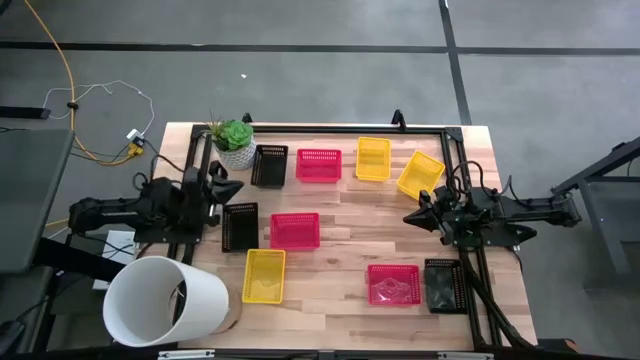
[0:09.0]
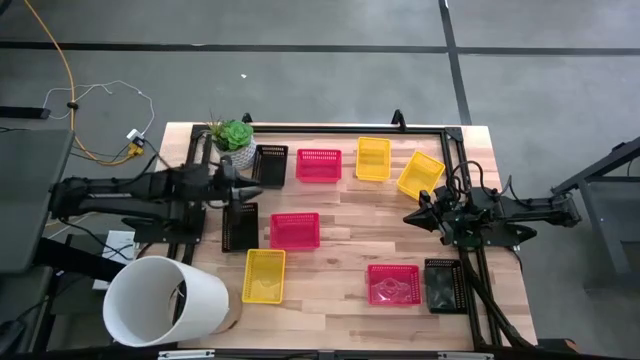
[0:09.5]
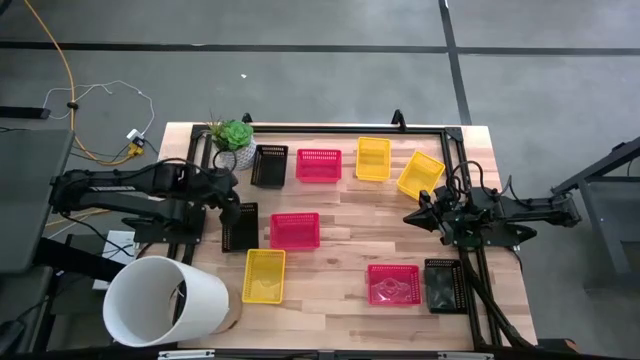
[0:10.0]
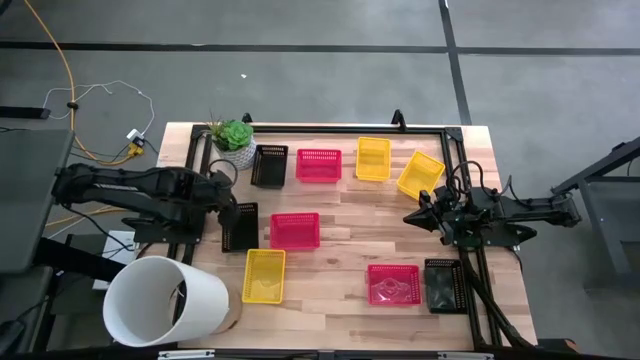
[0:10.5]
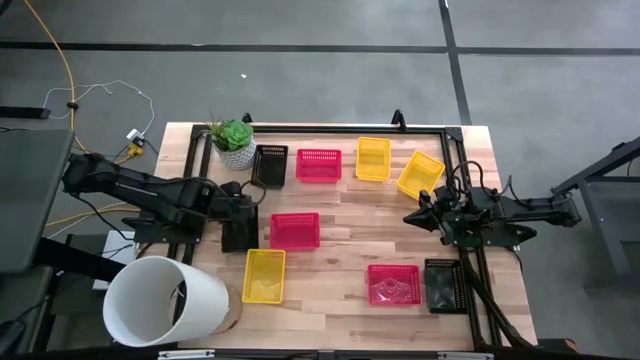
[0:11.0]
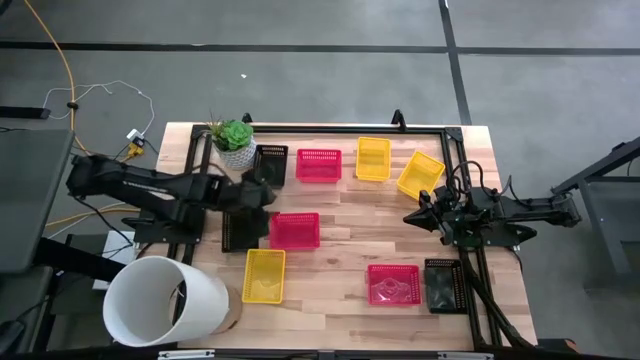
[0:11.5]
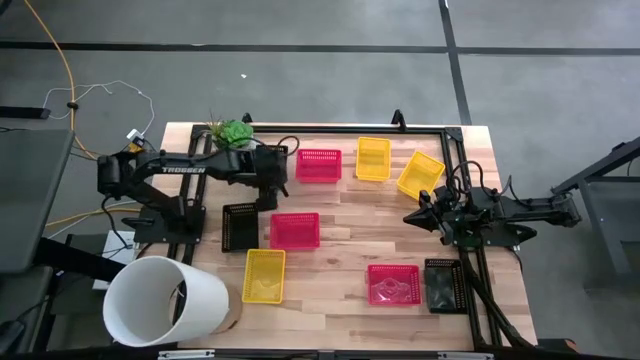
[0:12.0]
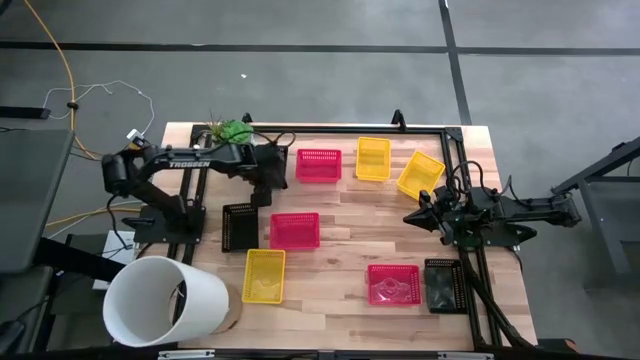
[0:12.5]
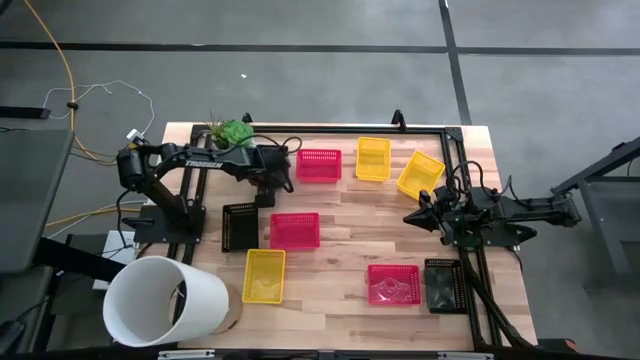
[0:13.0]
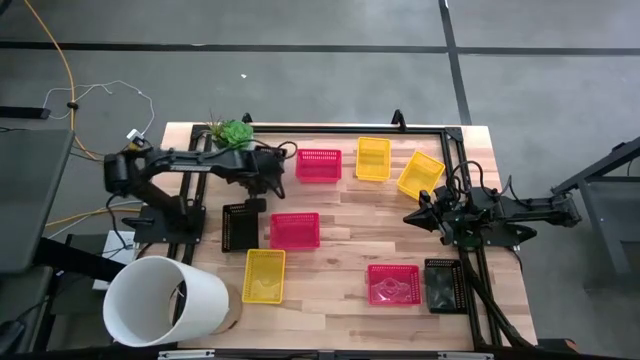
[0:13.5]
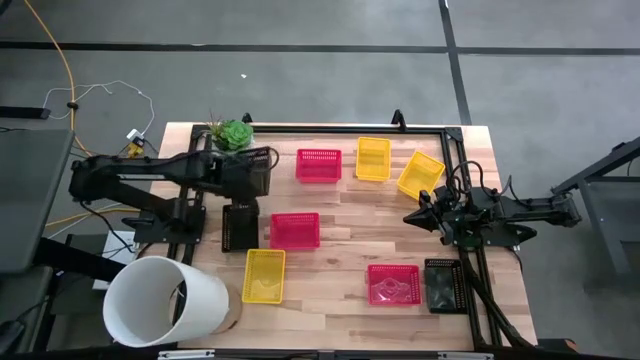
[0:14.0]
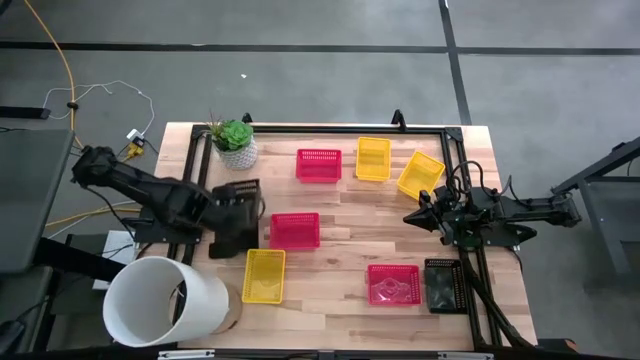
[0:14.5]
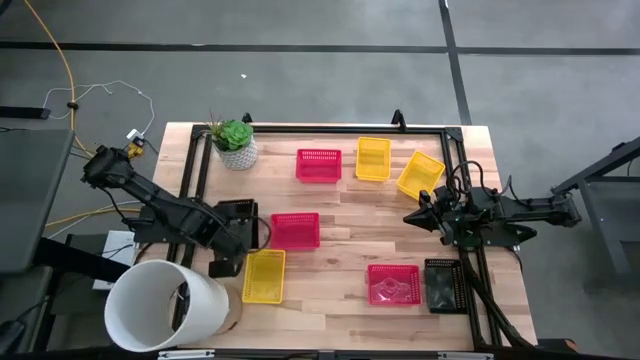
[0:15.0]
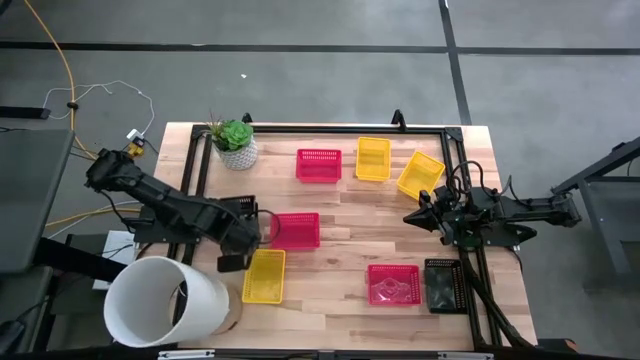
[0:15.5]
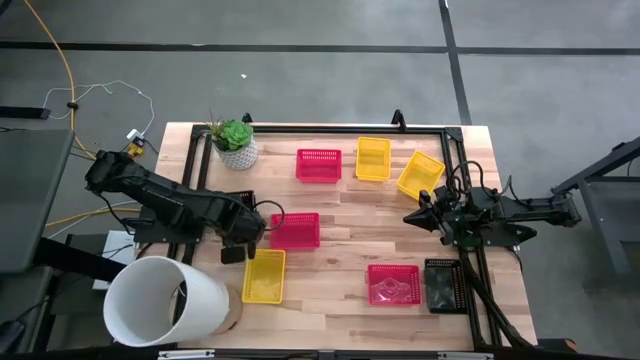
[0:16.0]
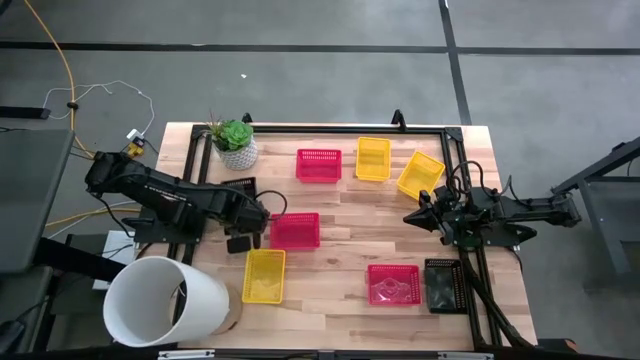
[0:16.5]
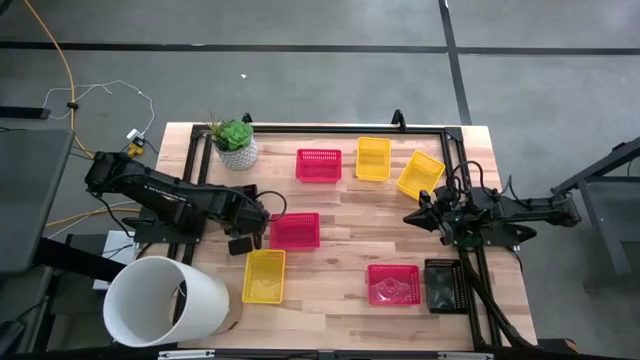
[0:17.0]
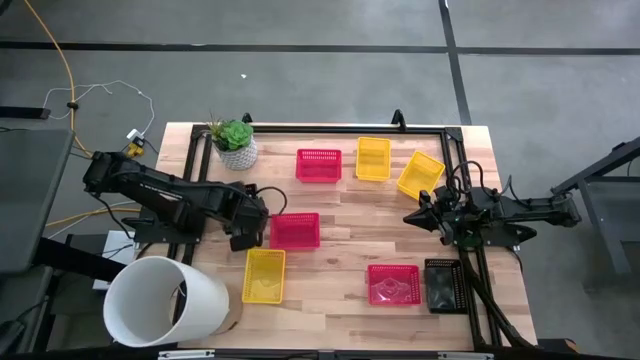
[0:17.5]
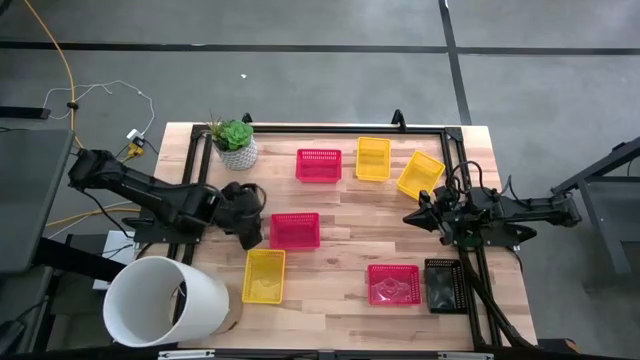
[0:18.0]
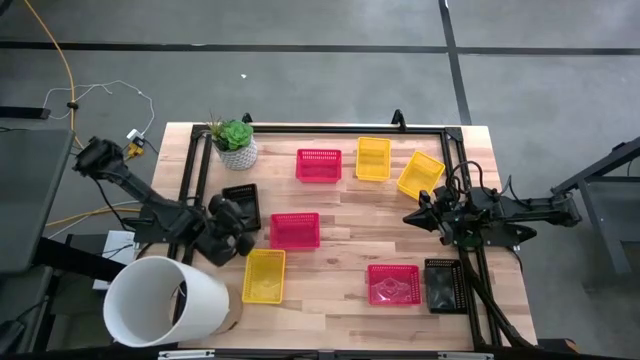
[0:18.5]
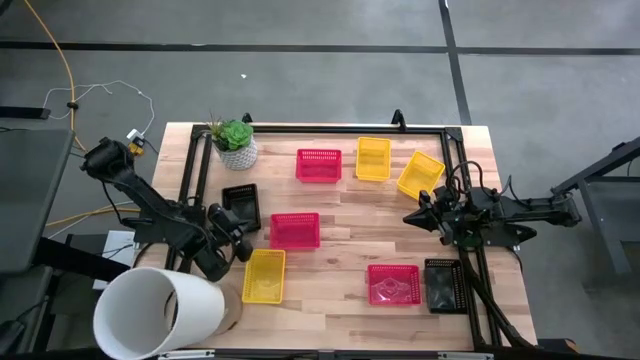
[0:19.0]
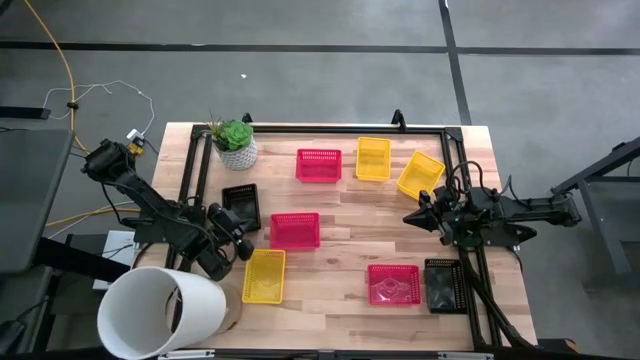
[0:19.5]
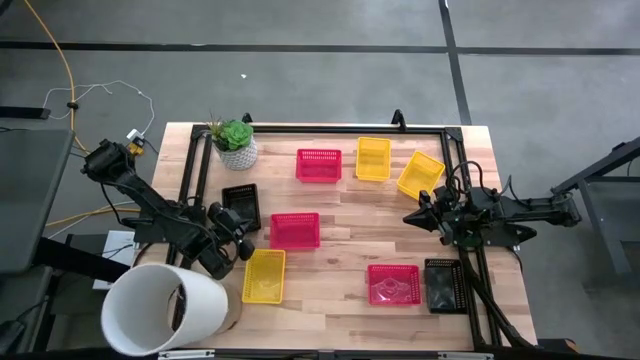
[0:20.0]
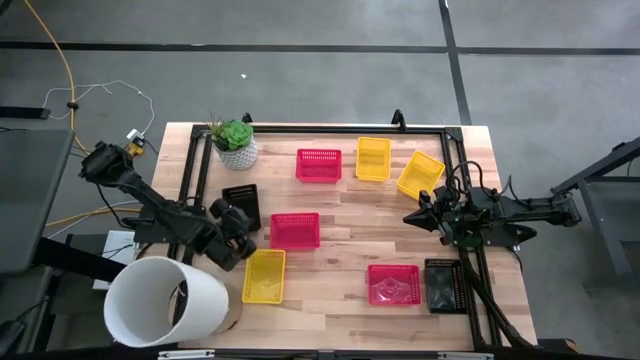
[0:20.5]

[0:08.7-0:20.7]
Stack the top black bin on top of the left black bin

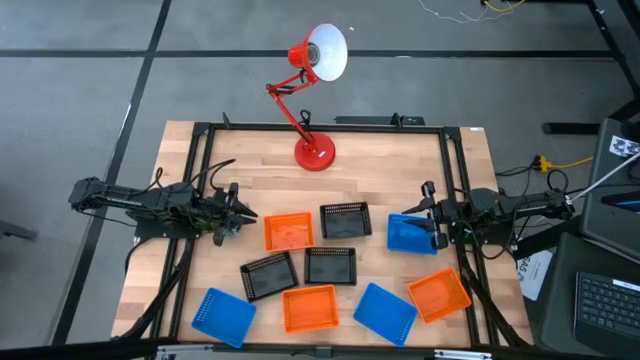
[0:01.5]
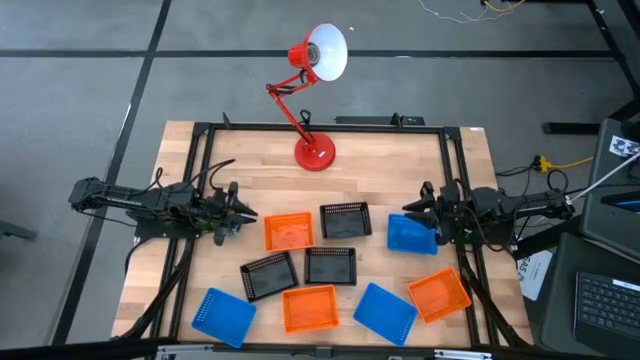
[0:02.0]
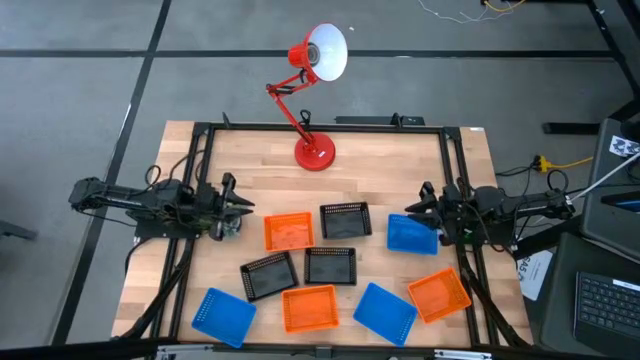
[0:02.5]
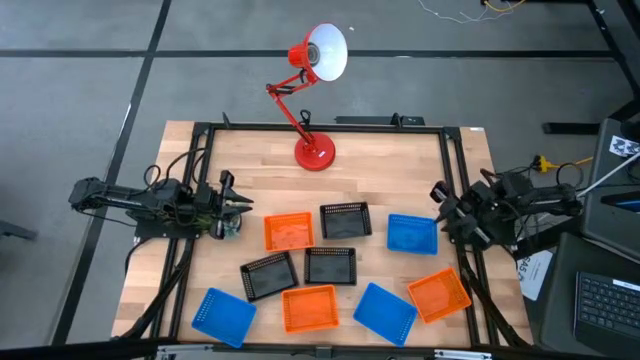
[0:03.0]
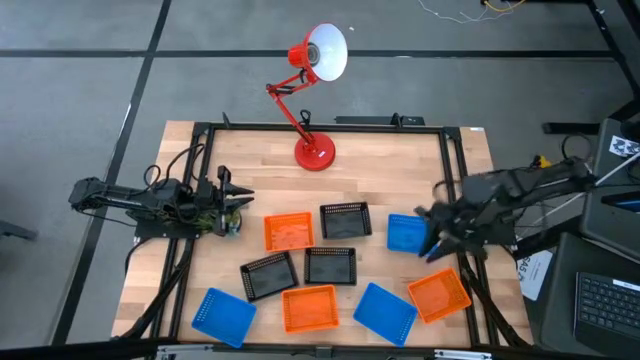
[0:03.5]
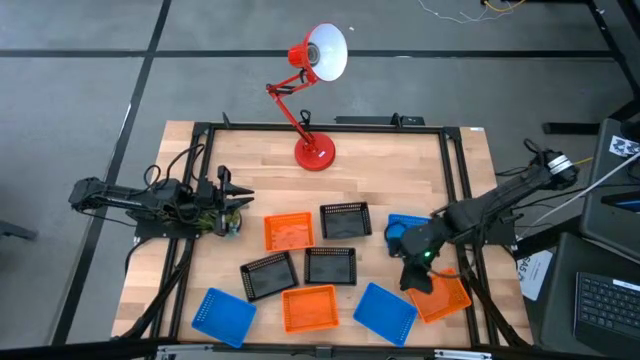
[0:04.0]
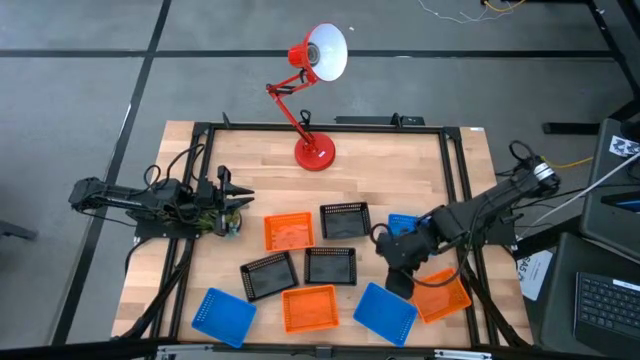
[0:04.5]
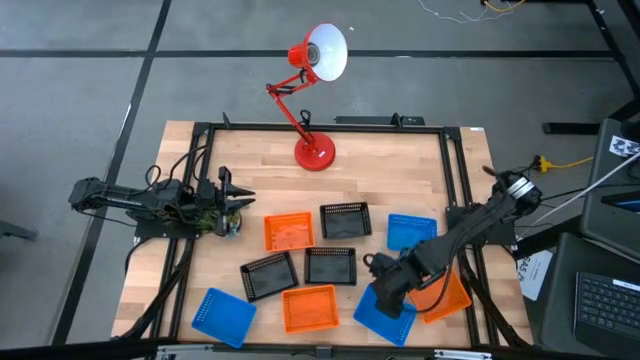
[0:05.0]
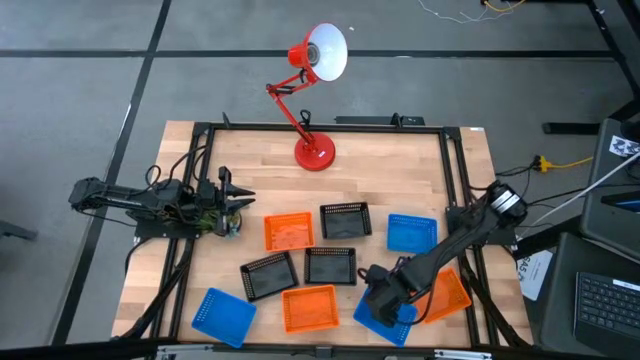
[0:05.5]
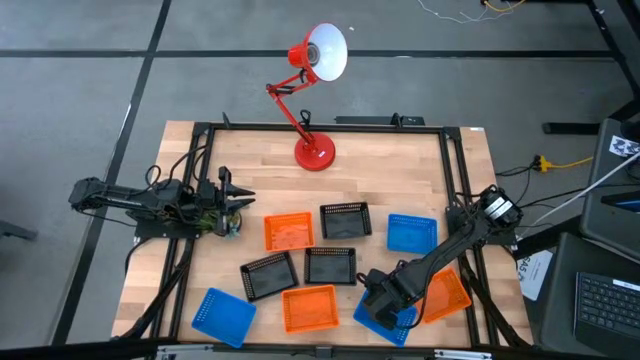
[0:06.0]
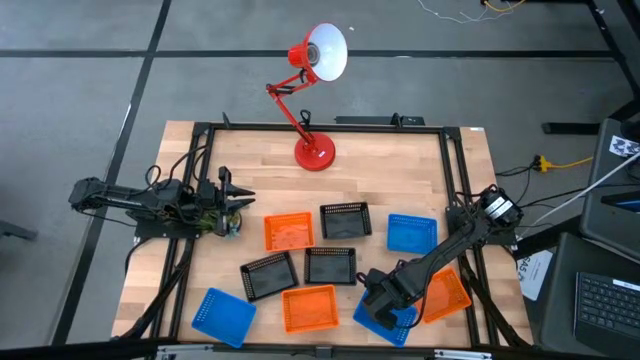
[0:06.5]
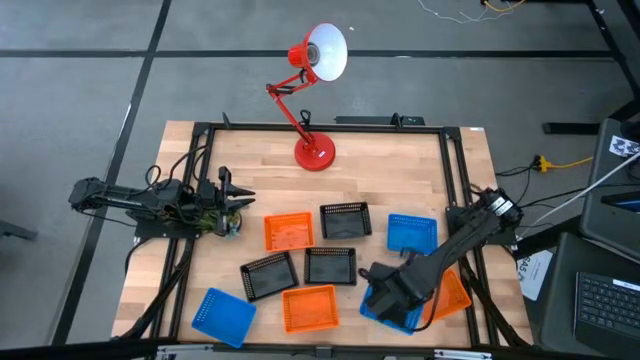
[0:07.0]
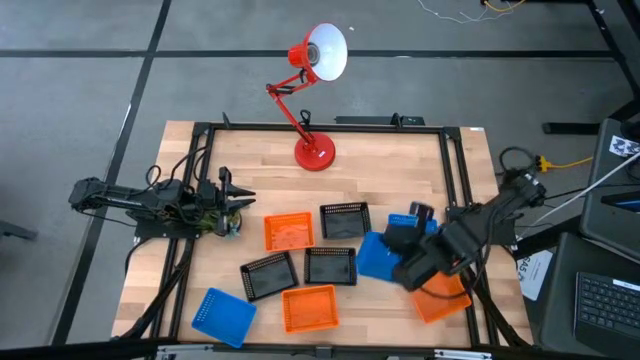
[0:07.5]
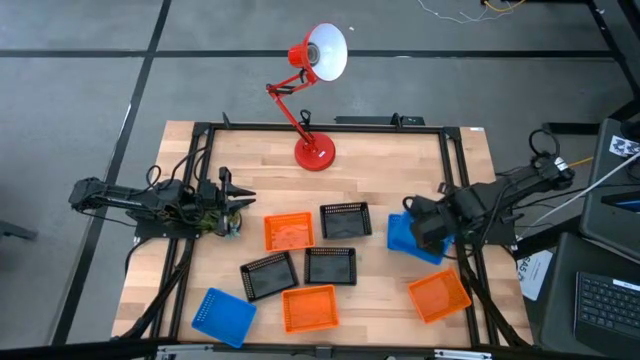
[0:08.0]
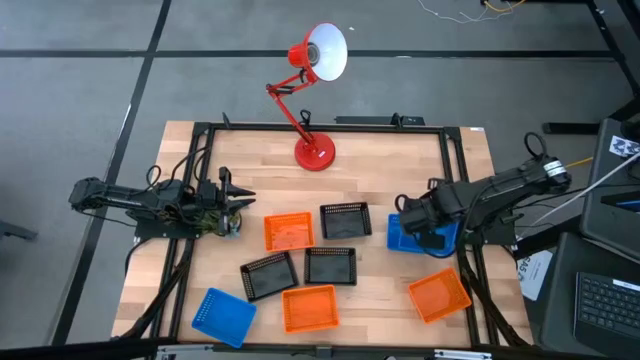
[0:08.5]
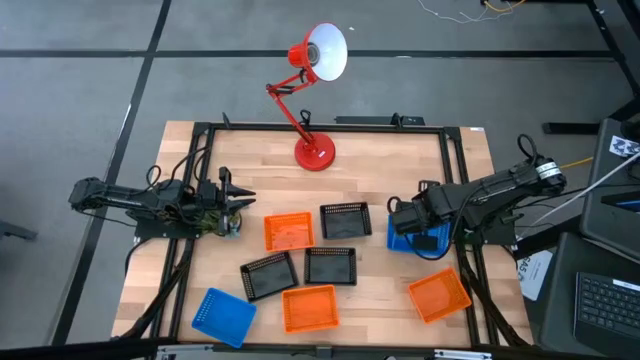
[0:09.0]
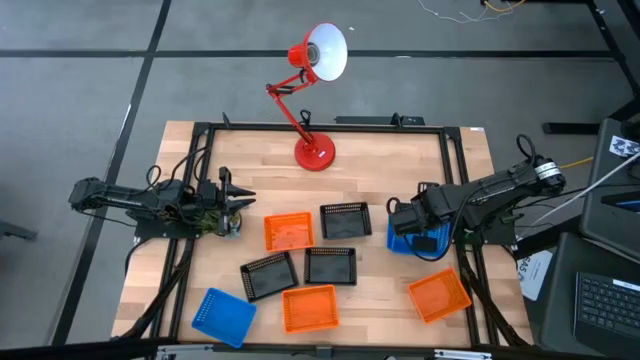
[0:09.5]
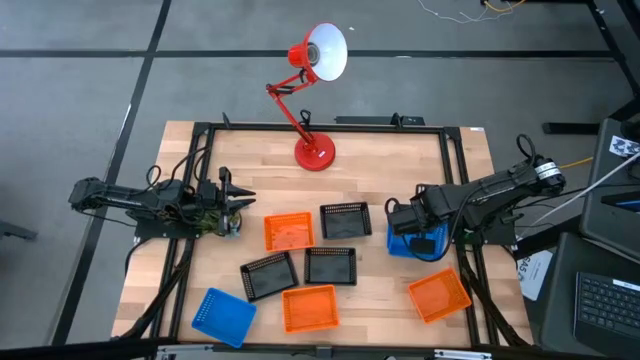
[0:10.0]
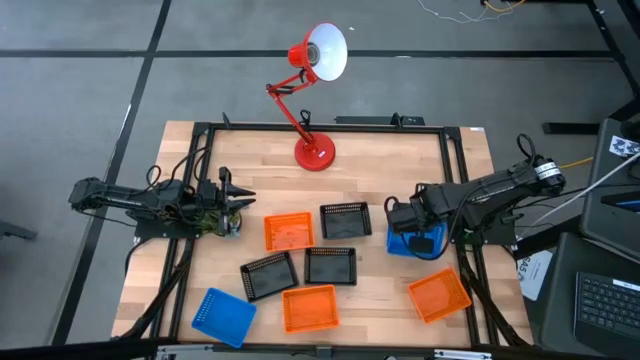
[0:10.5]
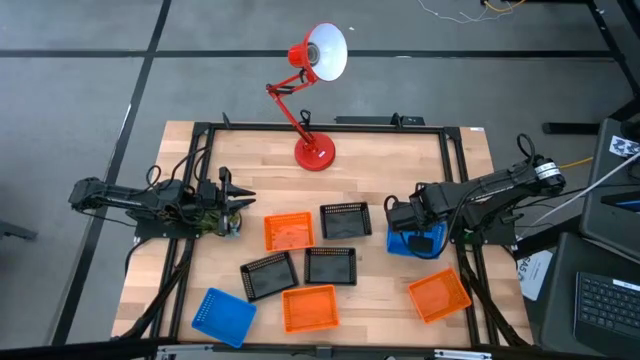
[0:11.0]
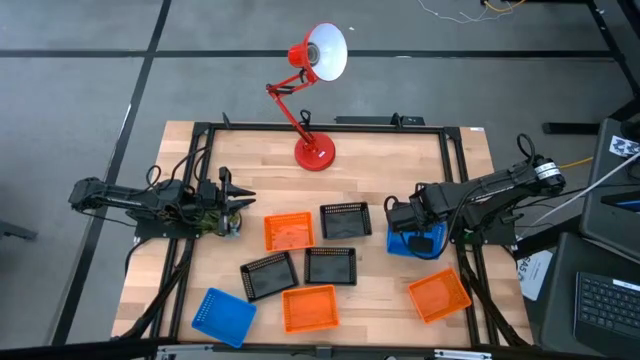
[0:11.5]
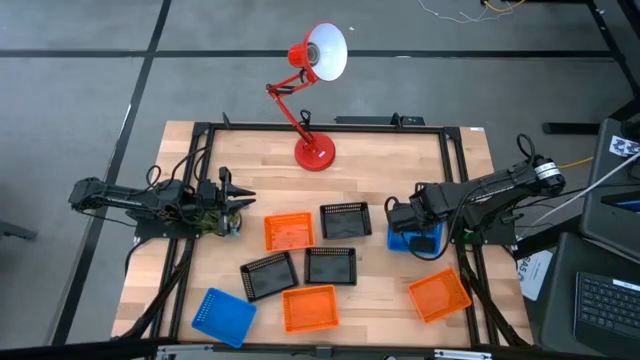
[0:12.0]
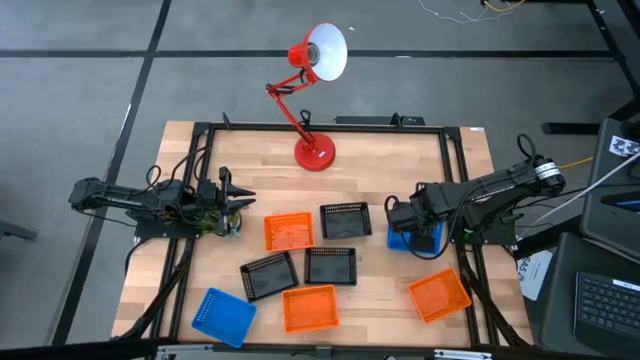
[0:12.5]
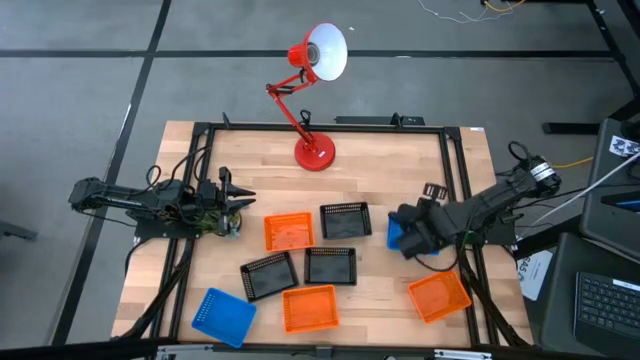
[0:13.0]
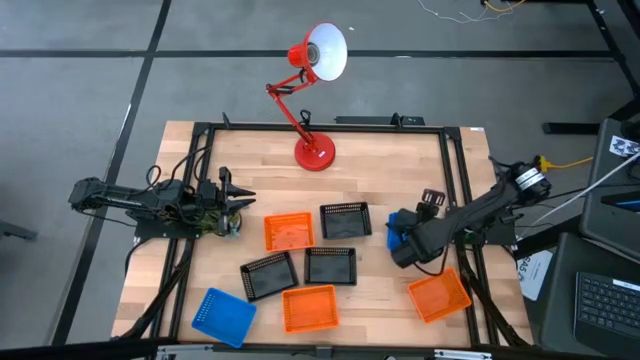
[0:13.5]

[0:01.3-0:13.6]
Stack the bottom right blue bin on the top right blue bin
